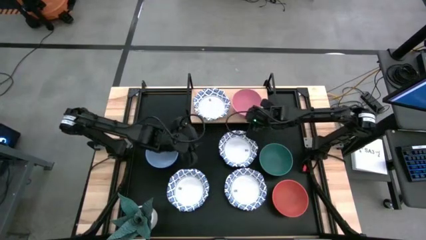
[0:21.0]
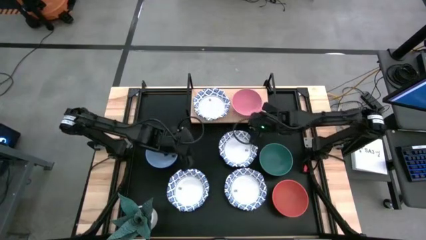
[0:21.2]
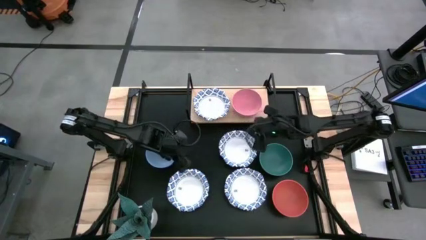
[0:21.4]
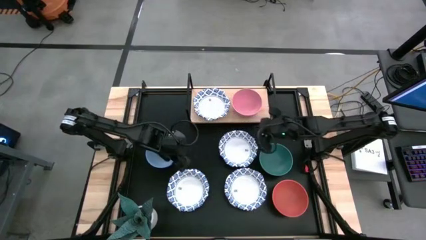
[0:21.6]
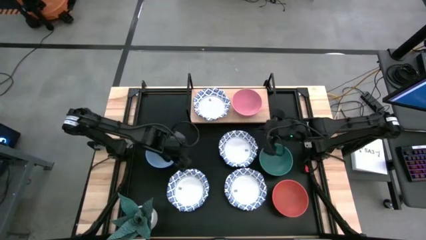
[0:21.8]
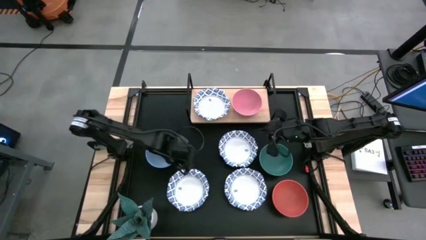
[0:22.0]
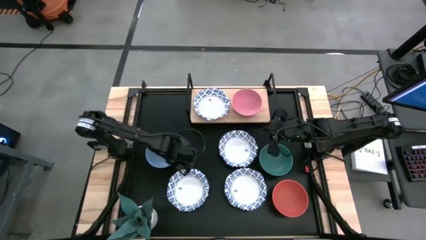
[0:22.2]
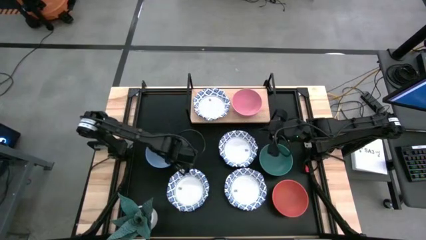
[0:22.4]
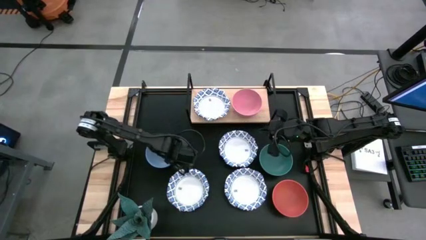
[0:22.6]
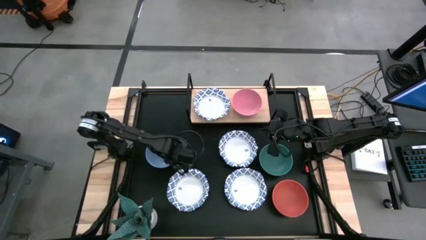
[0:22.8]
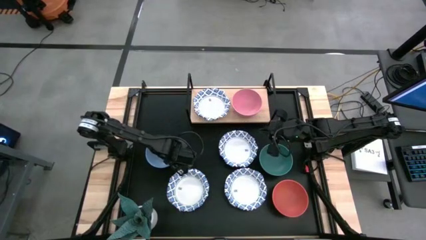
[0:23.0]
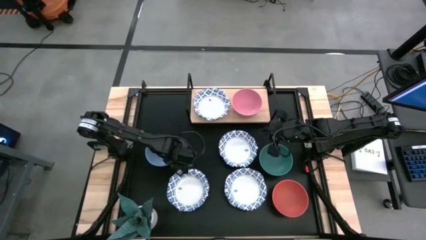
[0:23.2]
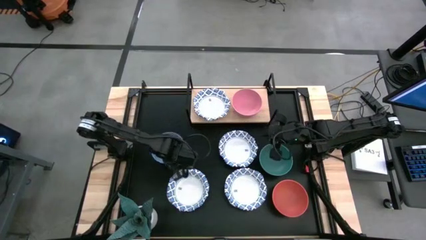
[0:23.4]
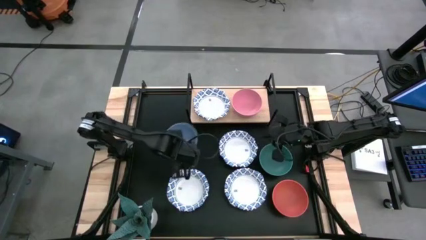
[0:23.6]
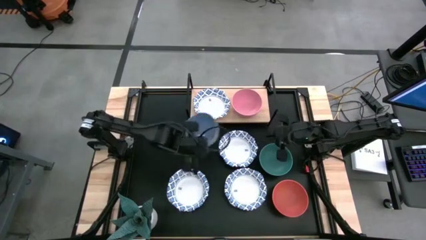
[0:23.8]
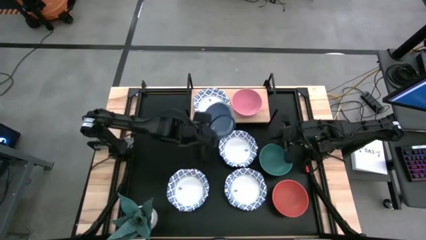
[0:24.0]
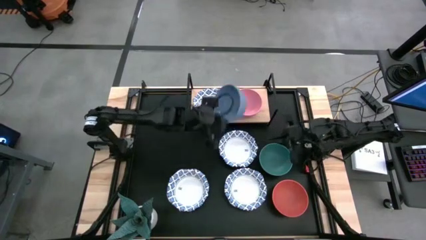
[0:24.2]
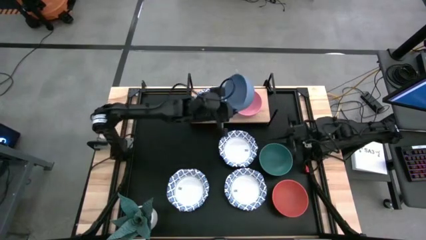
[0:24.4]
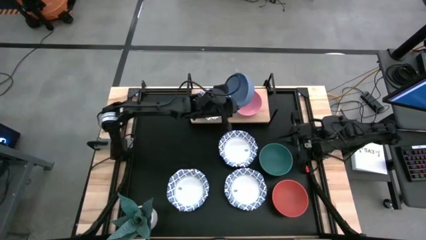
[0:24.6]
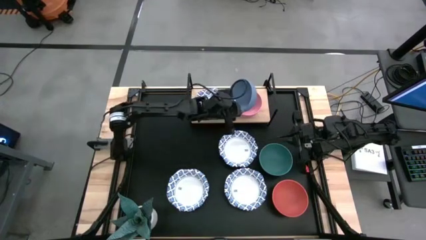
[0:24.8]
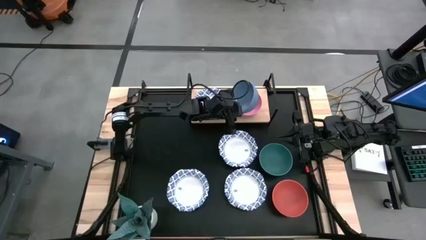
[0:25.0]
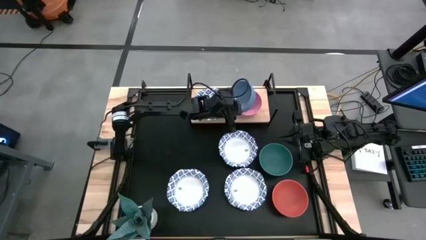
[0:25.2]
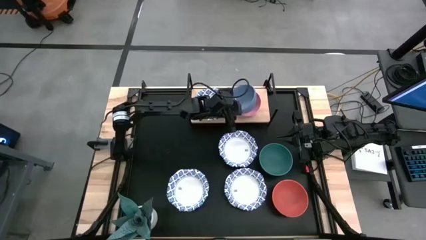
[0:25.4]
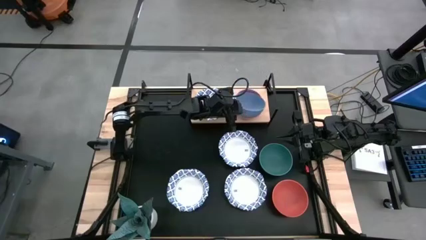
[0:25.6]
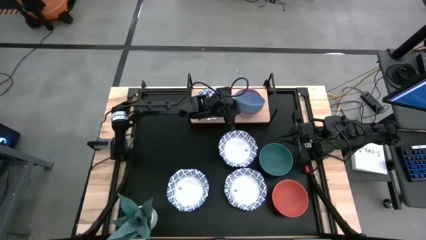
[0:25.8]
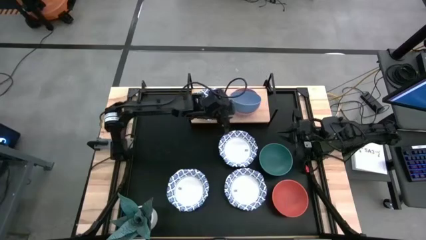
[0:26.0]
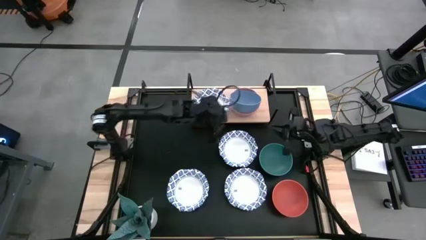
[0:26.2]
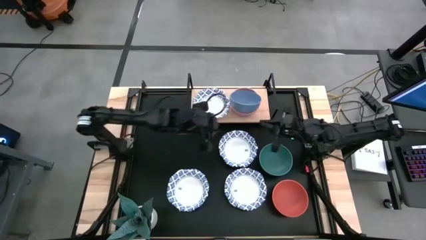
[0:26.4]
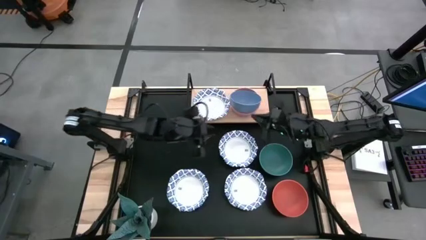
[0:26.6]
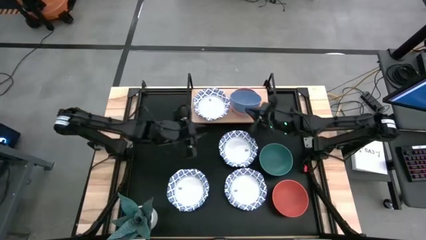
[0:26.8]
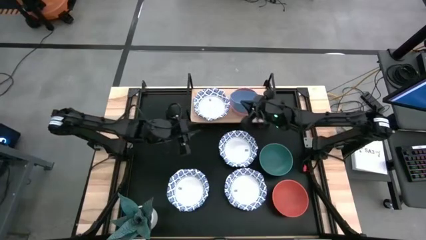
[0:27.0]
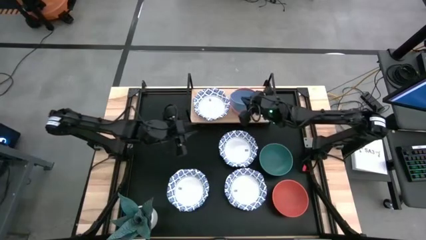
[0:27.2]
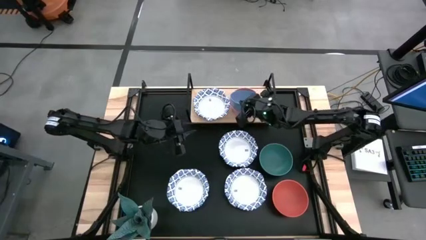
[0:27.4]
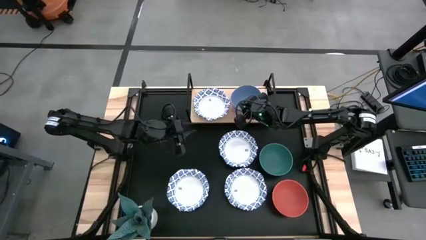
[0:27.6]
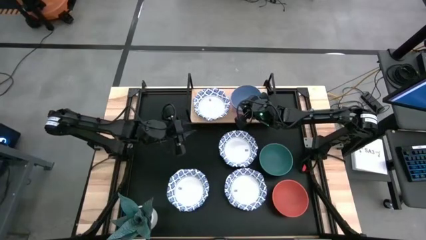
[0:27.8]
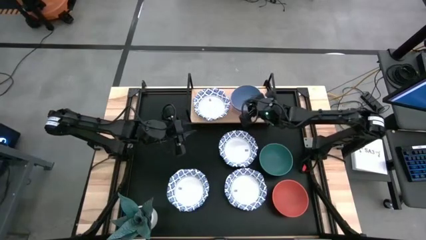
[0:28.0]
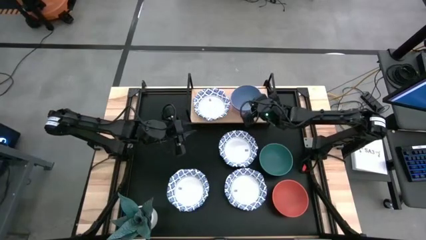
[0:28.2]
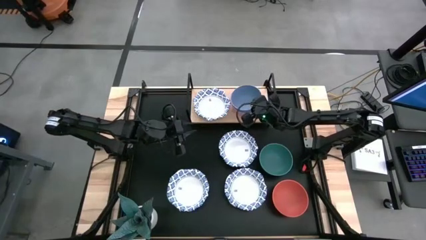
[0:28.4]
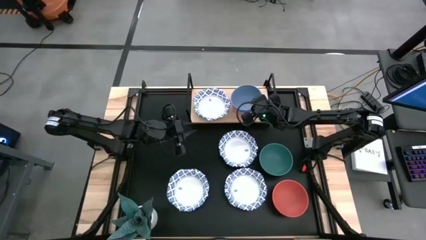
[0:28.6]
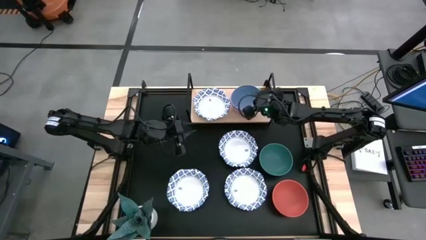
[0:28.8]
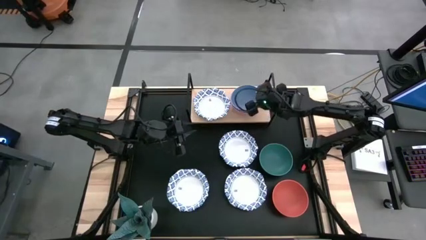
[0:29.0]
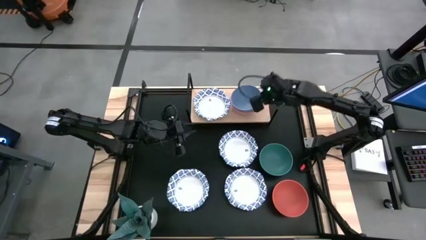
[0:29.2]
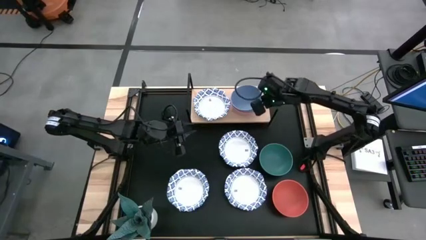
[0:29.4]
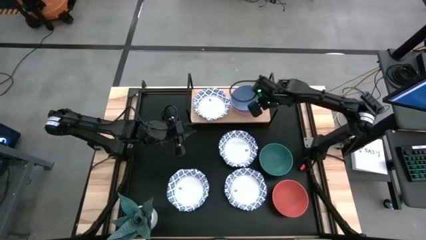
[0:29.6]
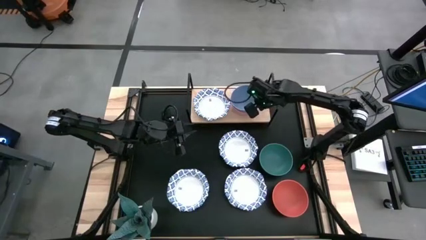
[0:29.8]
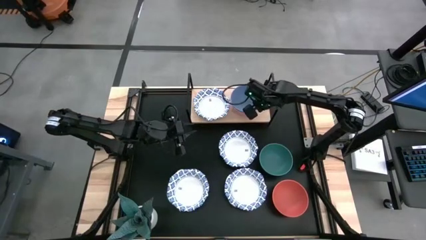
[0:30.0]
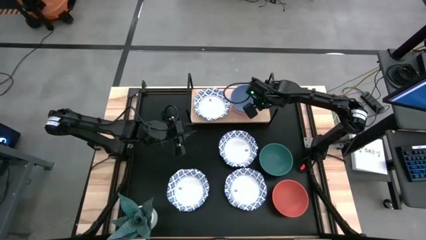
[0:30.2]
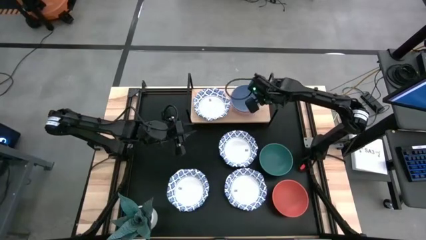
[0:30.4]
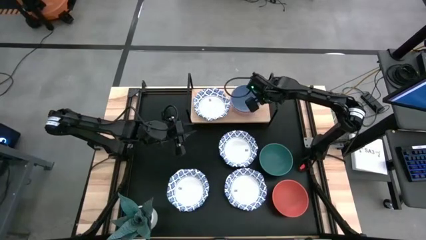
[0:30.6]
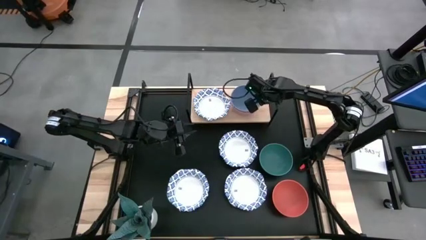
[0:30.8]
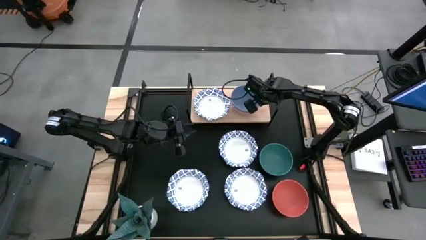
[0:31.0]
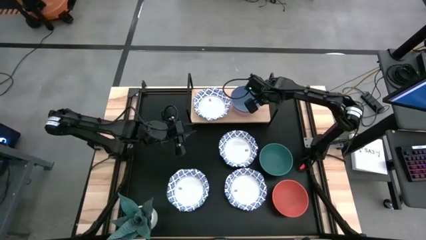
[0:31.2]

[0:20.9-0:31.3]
Task: Place and stack bowls onto a shelf
Stack the blue bowl on top of the pink bowl on the shelf

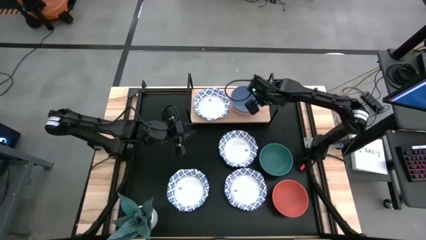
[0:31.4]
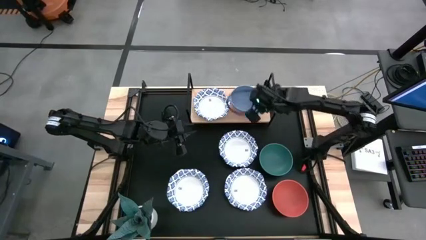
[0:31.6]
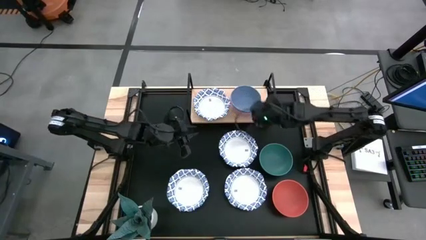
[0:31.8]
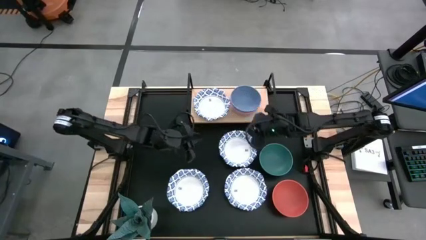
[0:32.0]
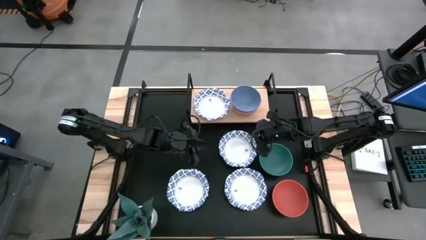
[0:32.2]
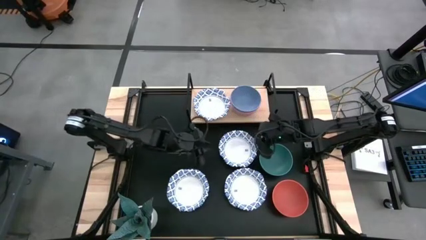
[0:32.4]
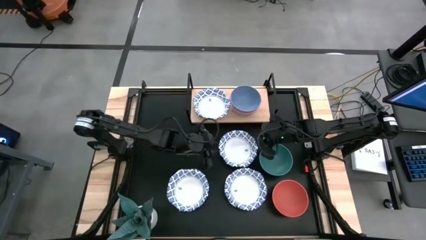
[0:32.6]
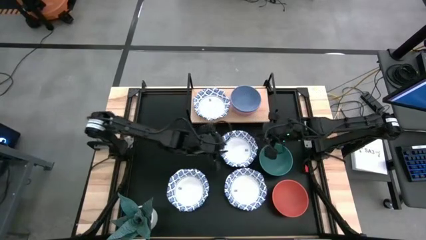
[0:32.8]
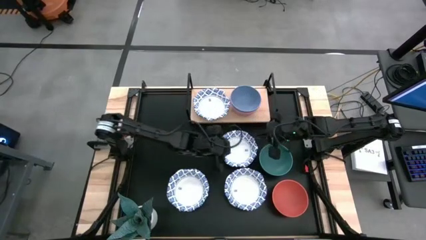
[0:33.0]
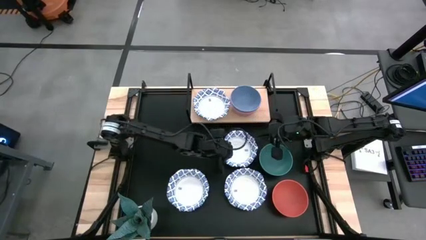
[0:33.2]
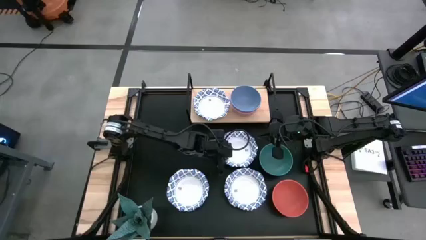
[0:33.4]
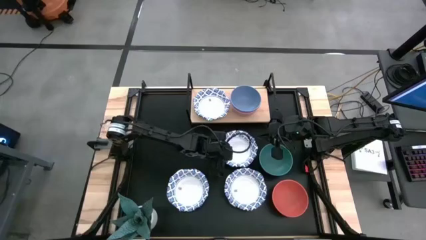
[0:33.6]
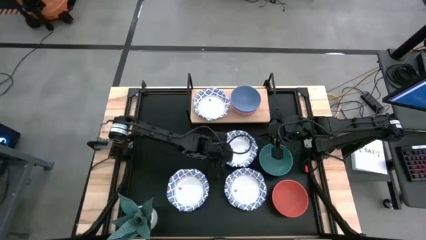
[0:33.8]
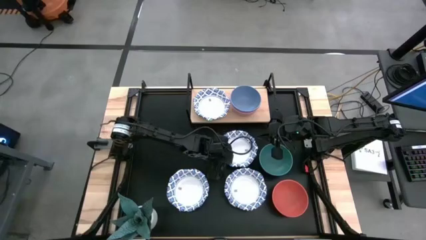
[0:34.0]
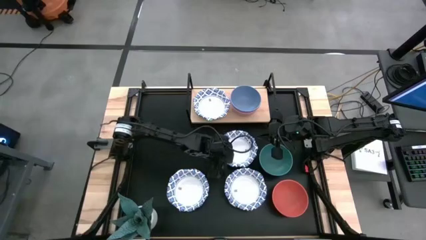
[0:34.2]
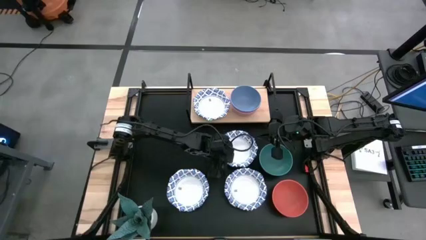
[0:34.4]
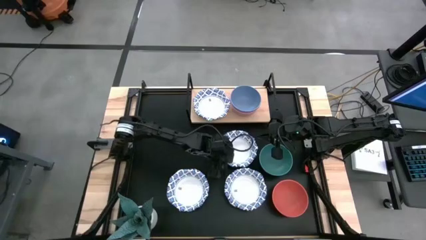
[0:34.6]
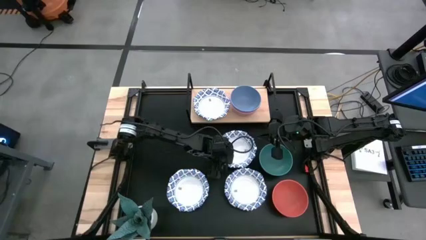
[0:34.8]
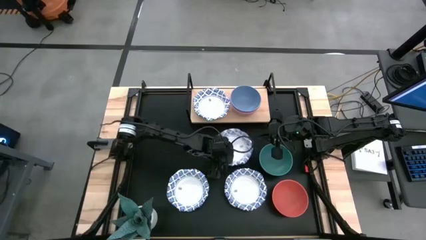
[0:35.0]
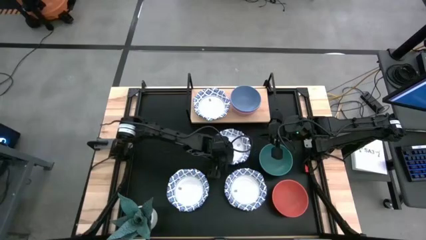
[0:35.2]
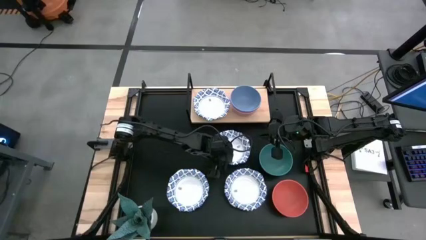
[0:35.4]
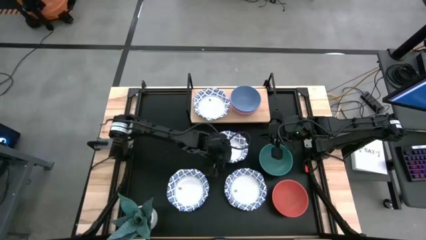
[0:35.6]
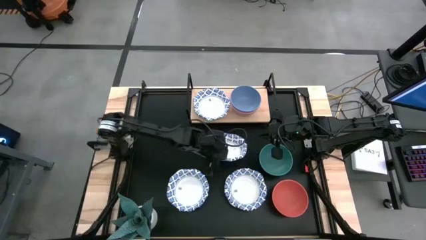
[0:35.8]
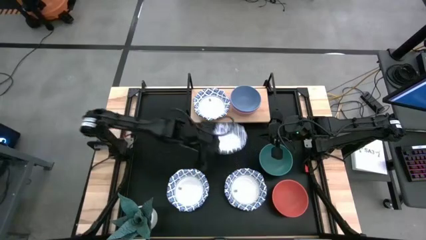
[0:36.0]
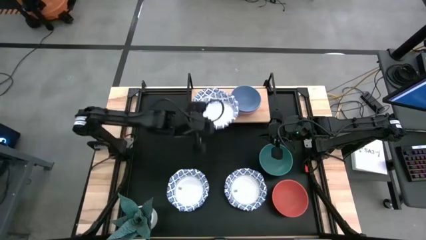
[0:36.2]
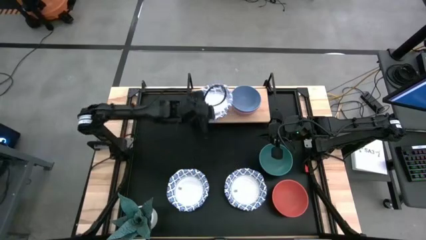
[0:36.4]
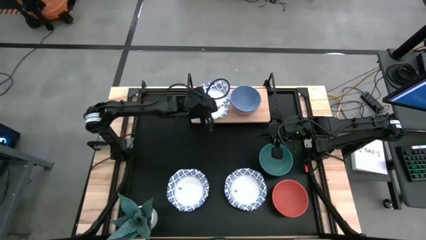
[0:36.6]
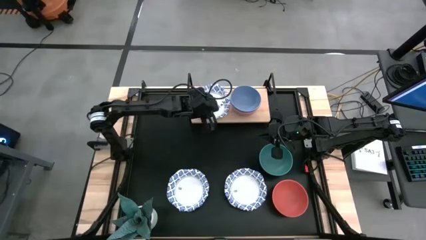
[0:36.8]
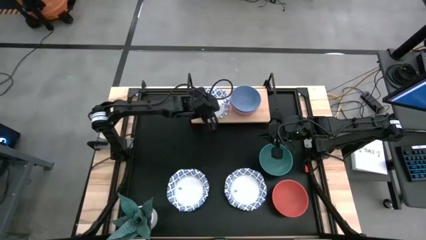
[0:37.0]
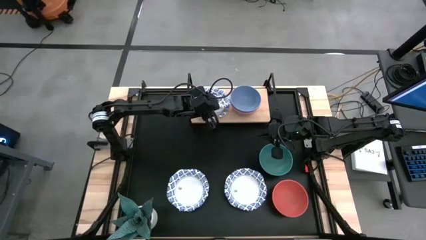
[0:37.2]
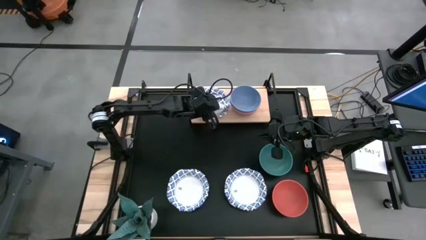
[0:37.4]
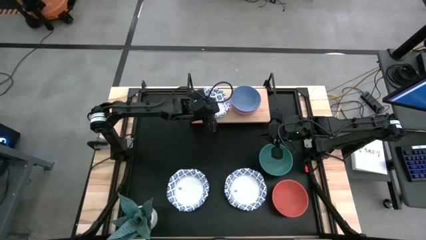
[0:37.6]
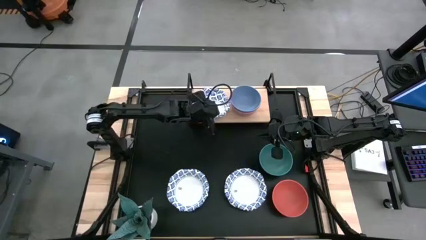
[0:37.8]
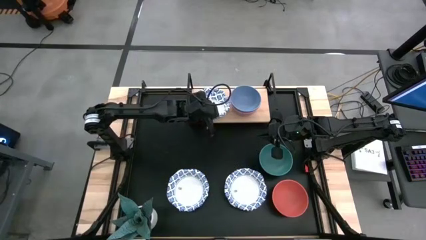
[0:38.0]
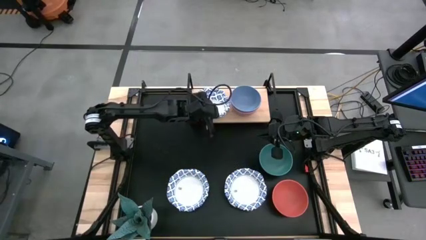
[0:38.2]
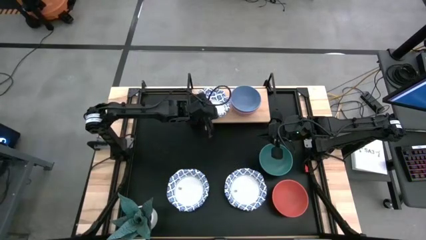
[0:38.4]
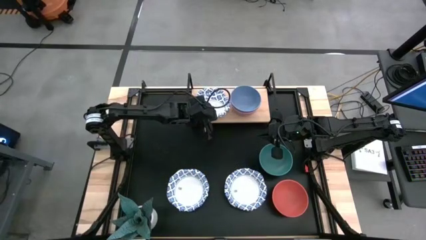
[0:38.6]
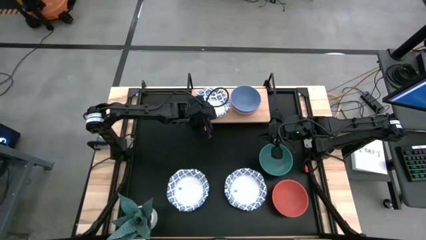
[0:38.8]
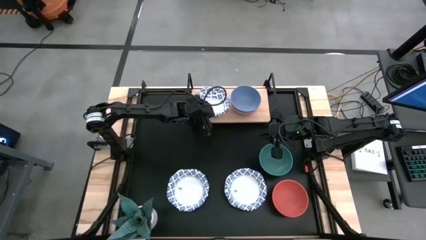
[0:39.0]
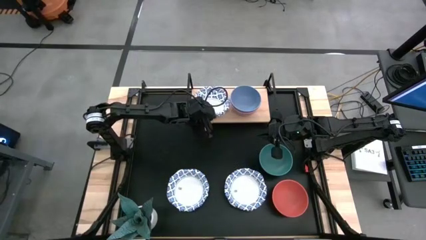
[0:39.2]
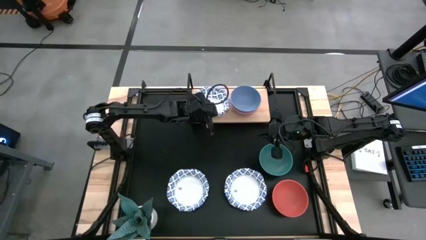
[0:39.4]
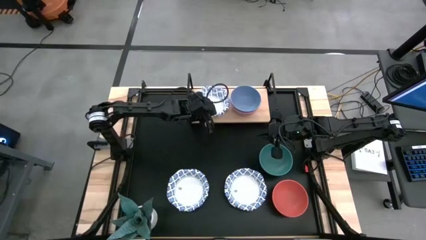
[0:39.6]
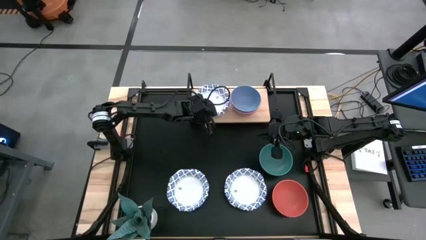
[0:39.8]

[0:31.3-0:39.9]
Stack the white and blue bowl on top of the white and blue bowl on the shelf
